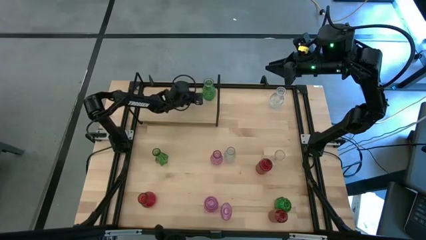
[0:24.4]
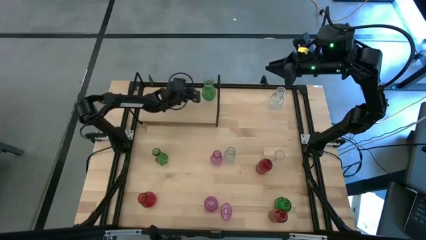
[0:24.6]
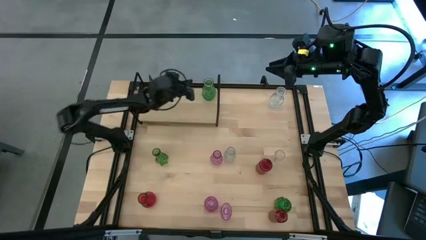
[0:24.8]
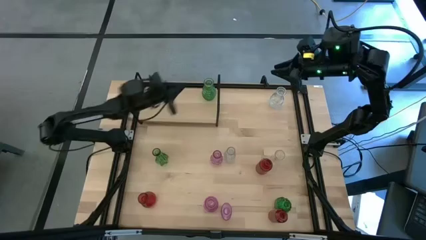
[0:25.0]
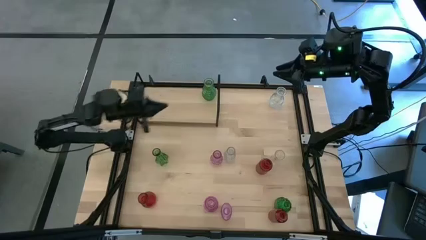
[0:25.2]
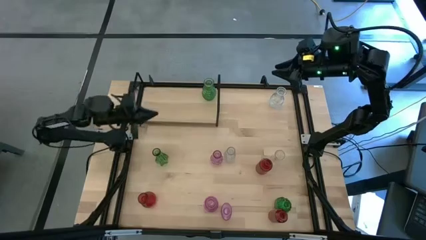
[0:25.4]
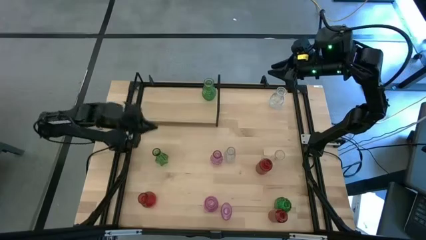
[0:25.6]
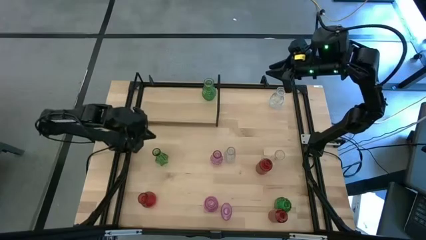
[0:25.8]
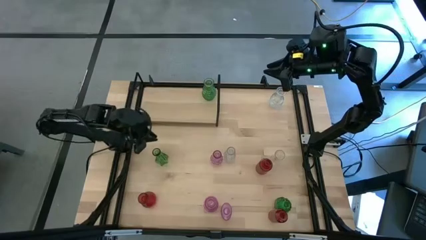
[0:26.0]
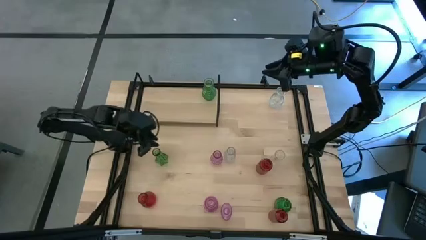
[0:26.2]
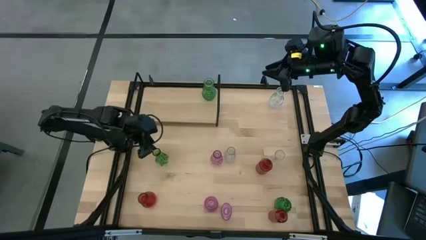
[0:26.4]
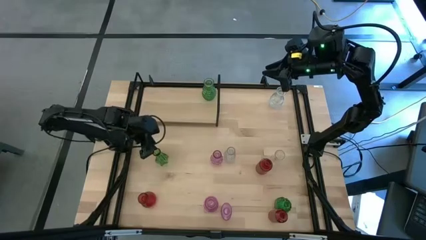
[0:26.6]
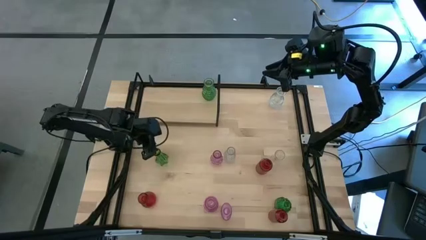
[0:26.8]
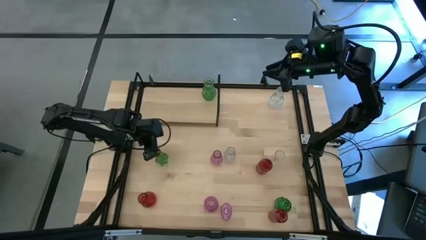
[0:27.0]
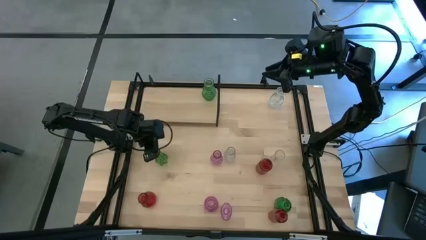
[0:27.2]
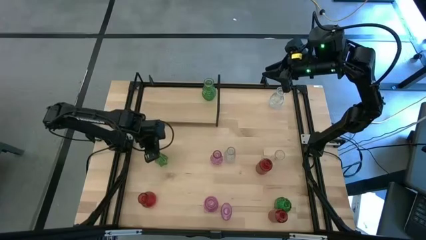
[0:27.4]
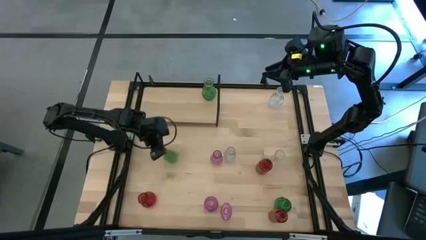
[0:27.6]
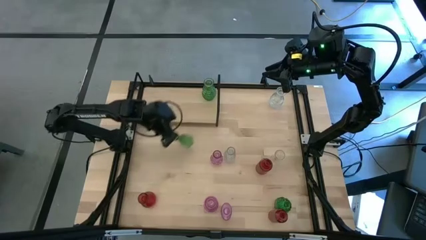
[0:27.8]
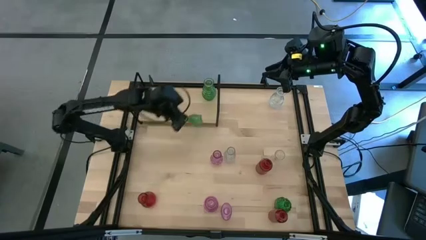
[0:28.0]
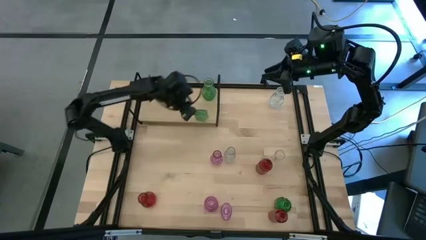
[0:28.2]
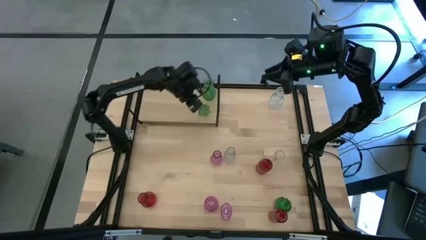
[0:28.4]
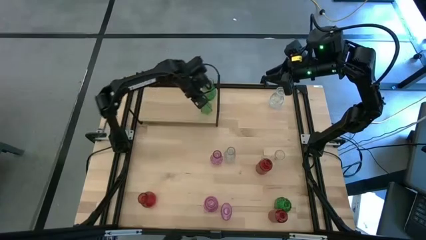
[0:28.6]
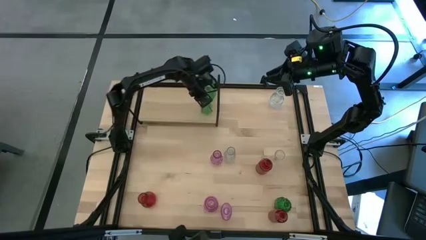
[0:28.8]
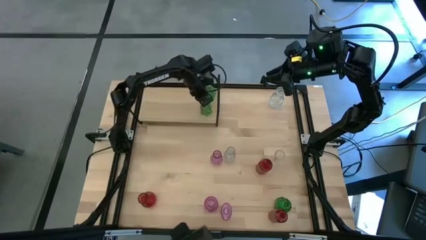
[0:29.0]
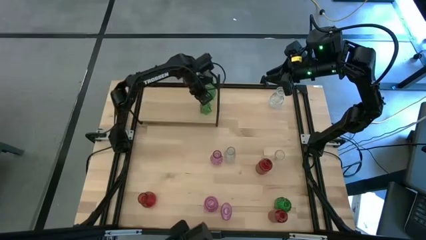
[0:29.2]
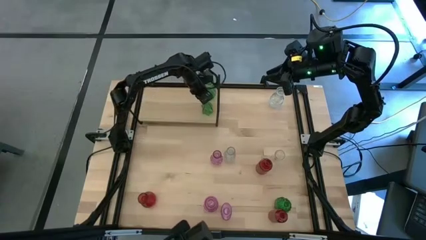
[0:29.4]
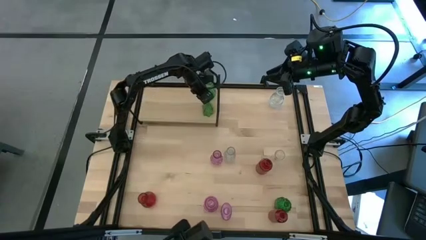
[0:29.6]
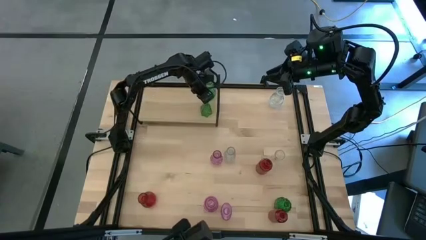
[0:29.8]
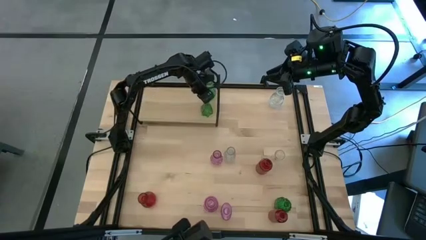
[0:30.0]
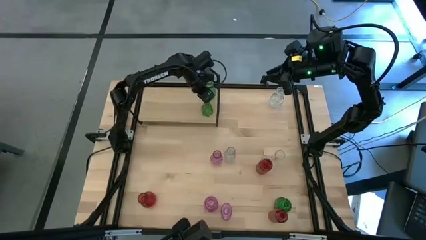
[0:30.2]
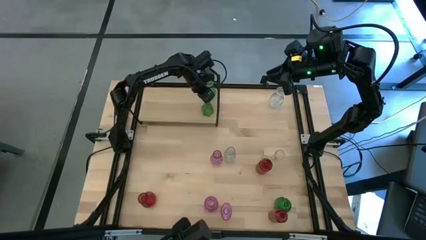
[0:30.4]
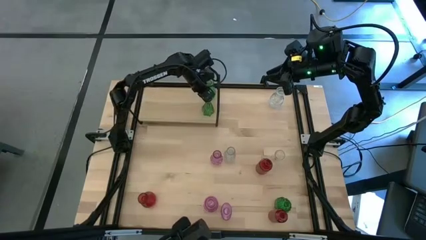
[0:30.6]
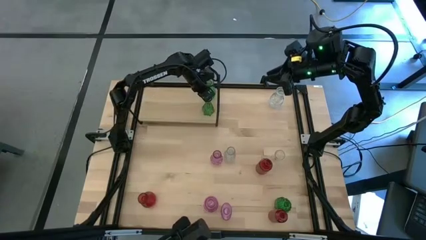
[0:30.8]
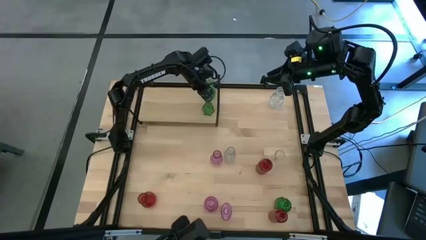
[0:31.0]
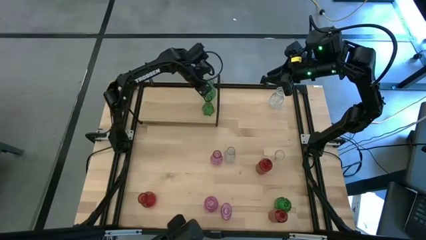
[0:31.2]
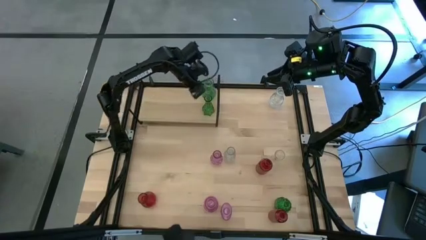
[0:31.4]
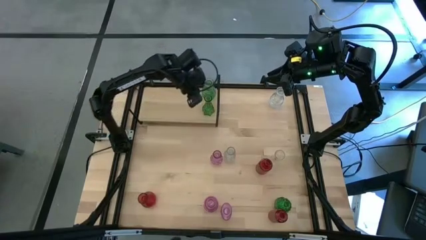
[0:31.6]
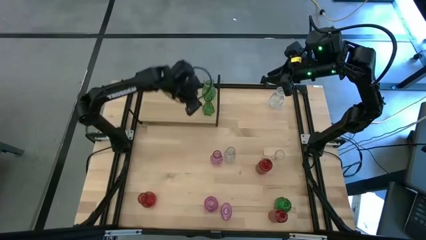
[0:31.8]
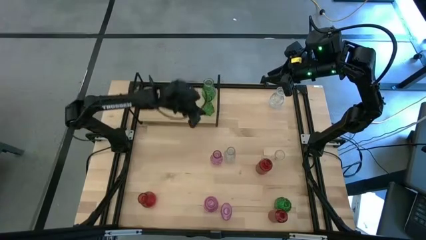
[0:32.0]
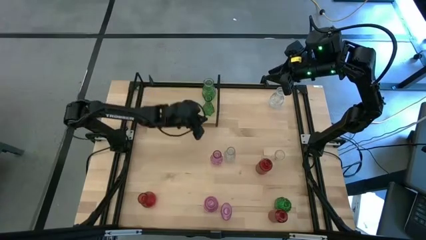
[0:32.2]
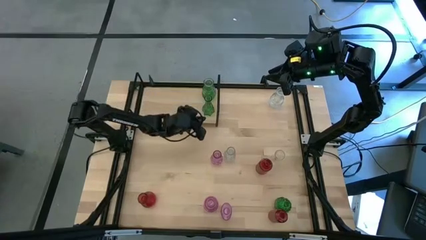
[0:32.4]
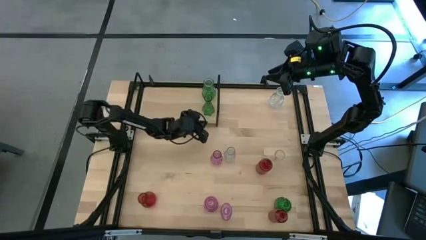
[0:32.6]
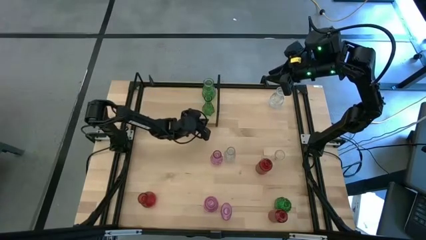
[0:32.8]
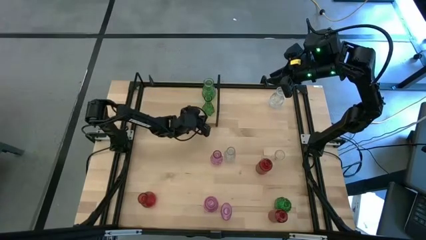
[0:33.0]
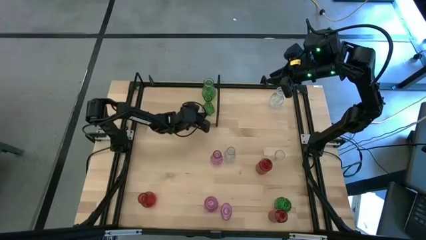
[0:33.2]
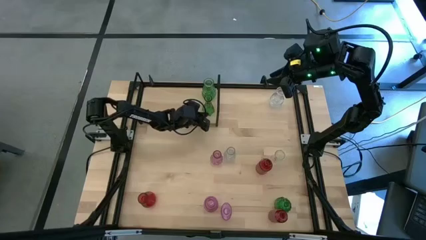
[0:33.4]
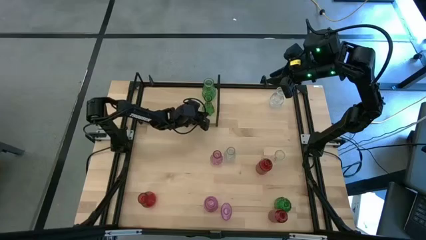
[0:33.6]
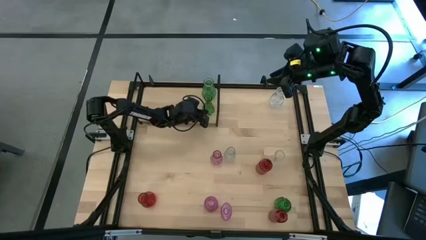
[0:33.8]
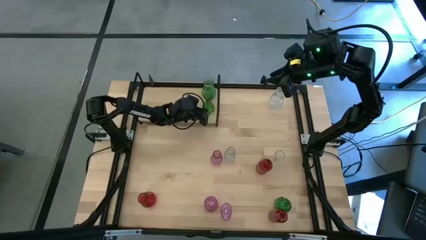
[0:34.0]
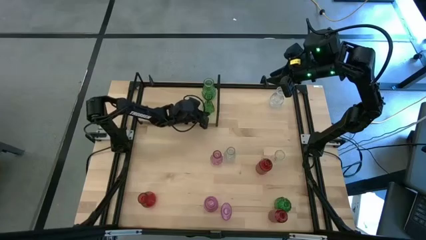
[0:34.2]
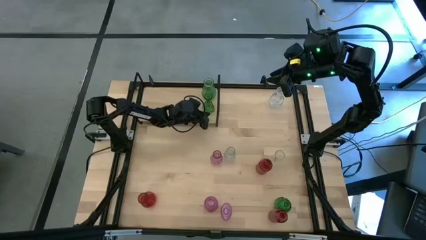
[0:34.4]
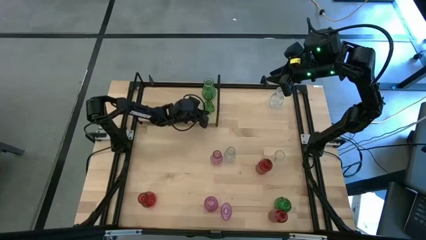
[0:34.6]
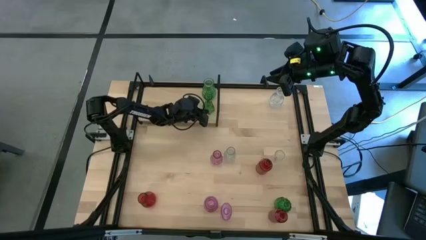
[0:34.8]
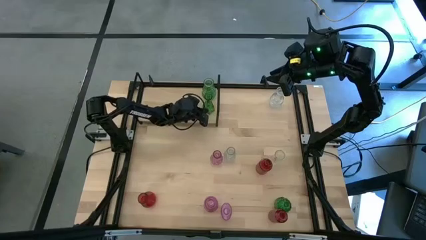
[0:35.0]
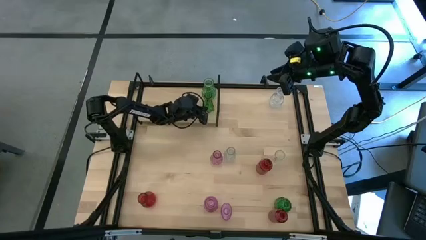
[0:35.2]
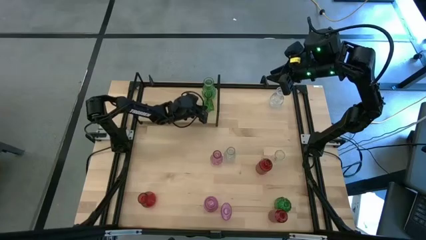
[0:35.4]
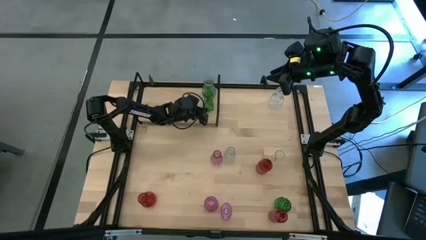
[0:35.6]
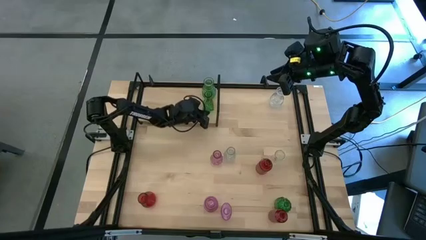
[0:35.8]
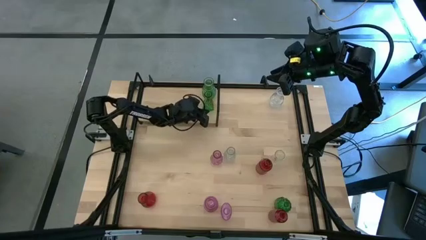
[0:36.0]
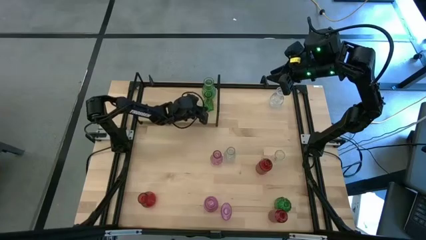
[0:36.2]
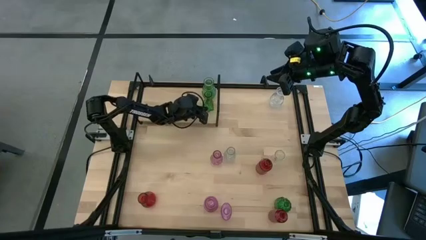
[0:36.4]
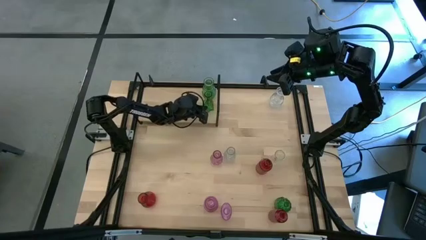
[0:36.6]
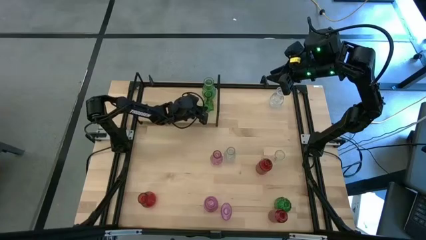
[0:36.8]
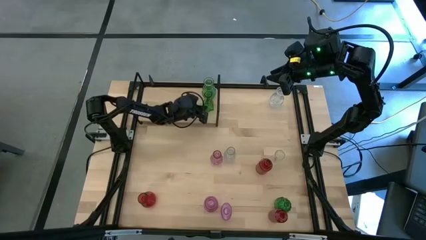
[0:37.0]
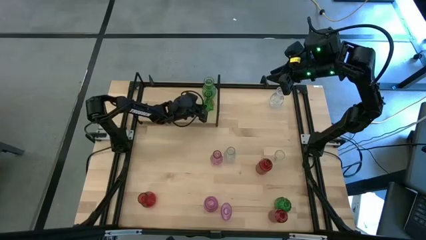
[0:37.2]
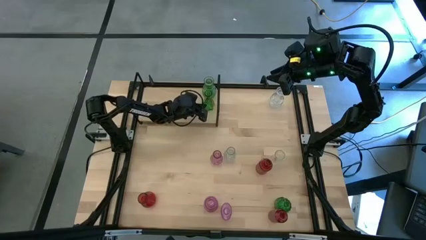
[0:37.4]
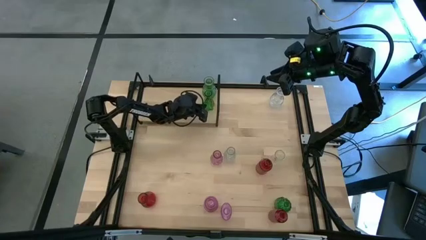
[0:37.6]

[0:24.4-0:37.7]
Task: sort vases onto shelf
Put the top green vase on the shelf aligned with the other green vase

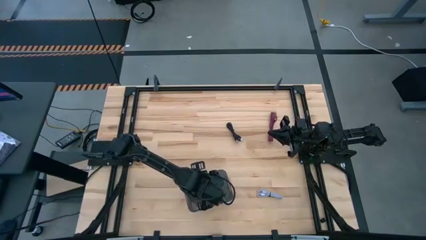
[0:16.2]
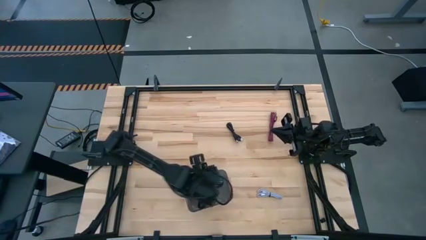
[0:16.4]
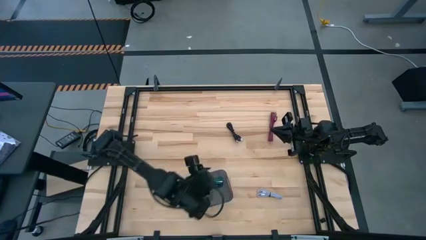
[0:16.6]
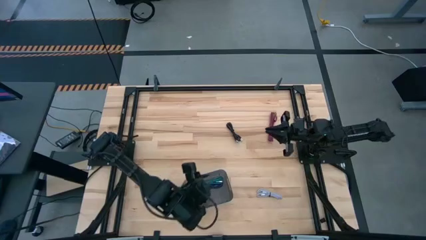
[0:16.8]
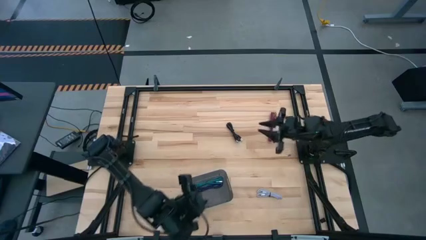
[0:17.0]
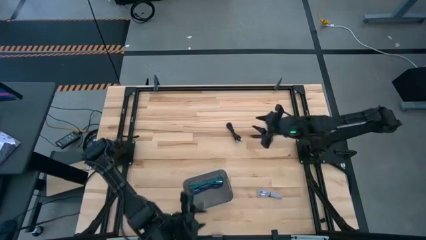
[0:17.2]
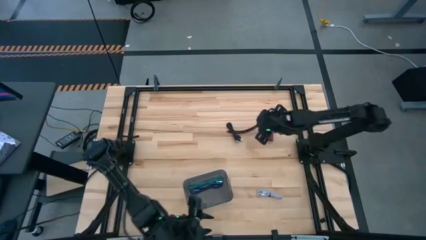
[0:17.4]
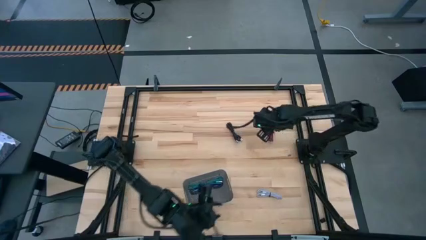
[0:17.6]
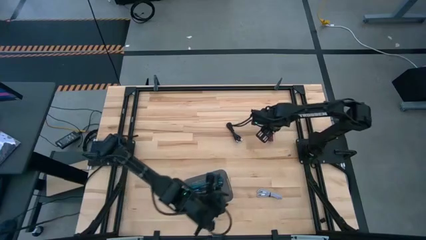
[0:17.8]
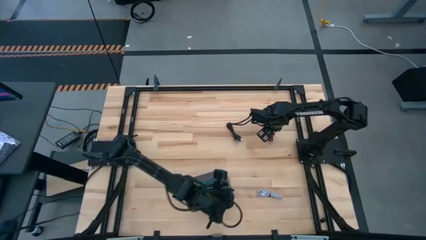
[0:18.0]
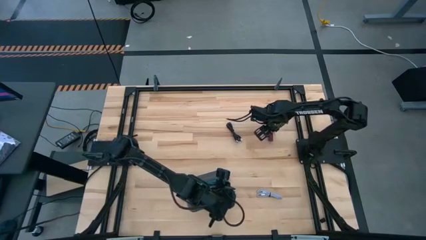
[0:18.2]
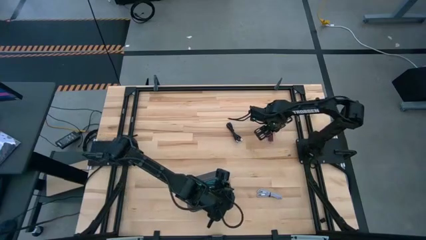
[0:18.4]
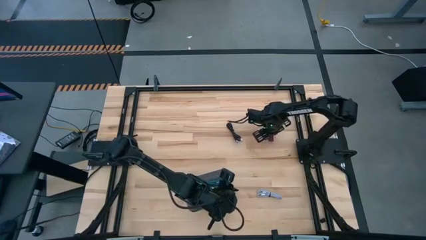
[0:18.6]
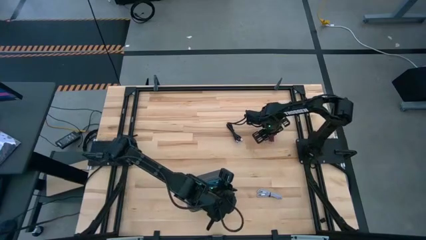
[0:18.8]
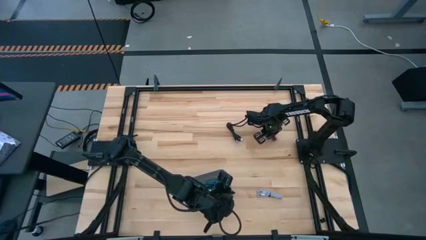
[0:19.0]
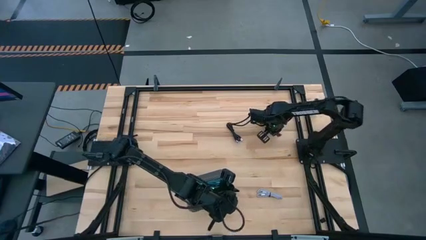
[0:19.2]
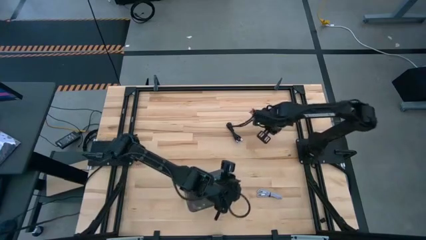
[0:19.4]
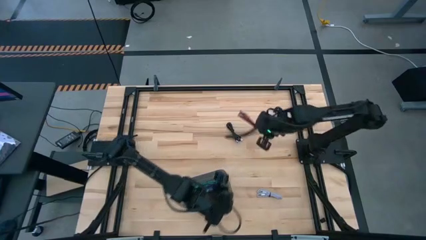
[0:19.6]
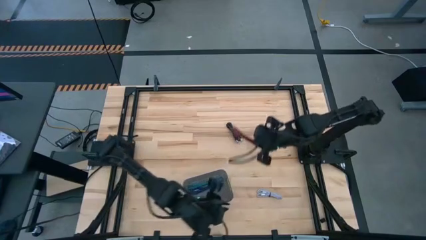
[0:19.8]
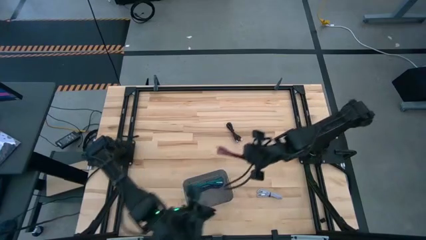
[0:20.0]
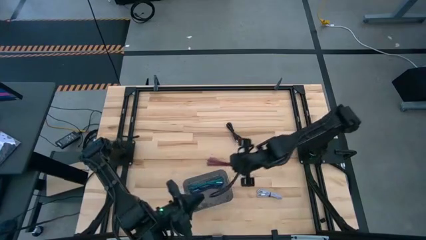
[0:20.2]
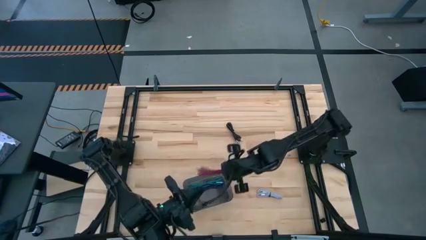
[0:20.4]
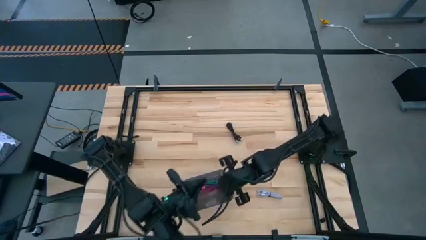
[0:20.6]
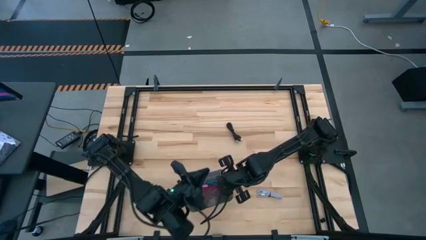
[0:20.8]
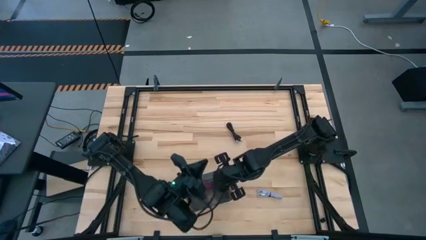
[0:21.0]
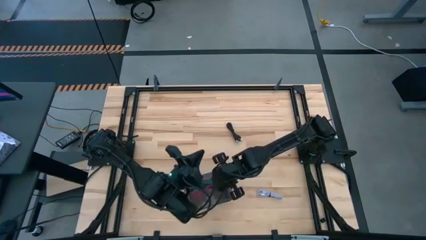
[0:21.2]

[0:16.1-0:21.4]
Task: Pick and place USB-C Cables
Put the red charger cable into the black bin
